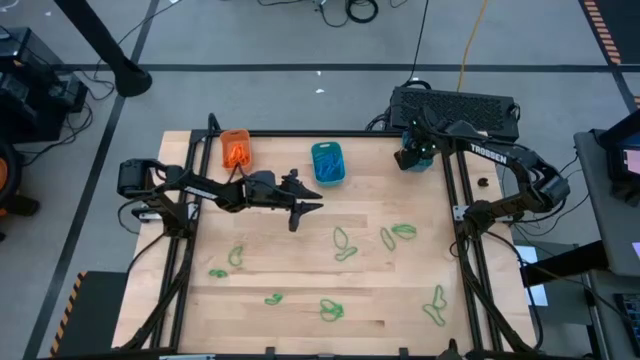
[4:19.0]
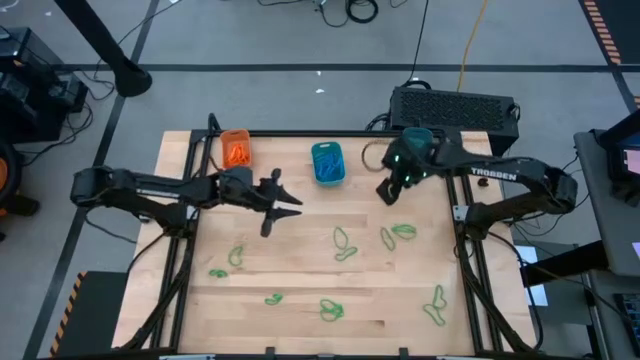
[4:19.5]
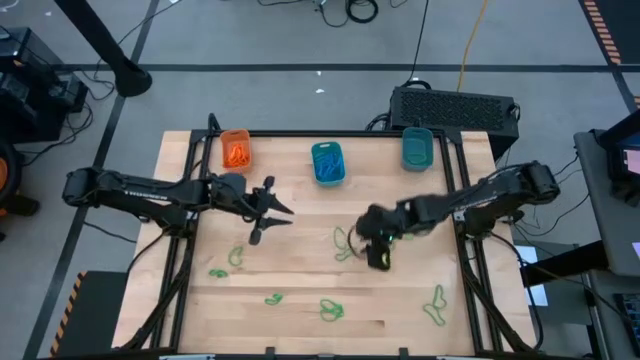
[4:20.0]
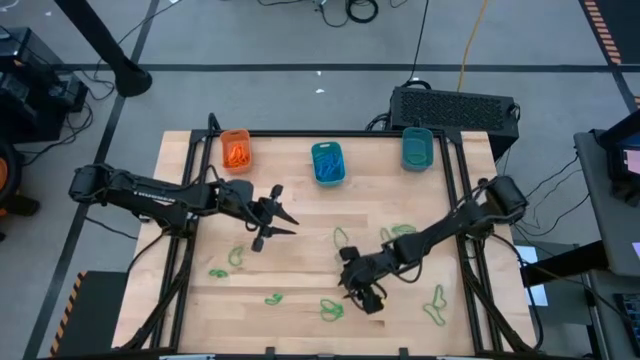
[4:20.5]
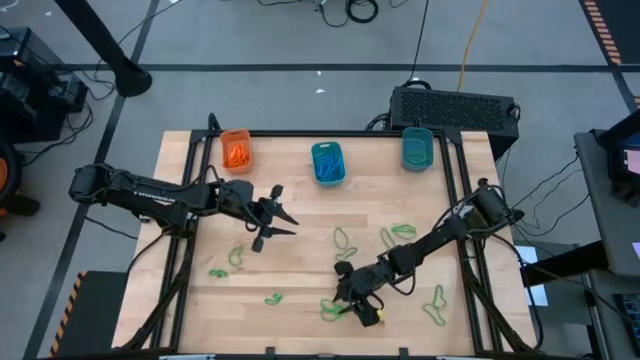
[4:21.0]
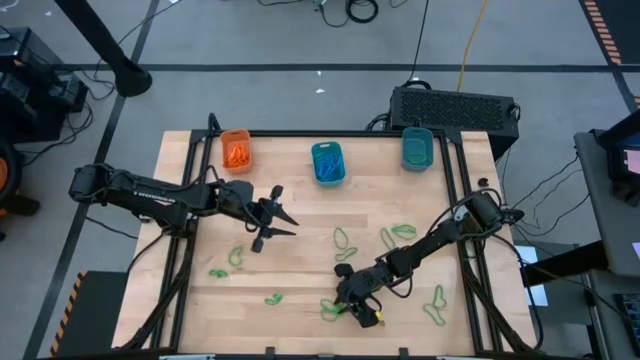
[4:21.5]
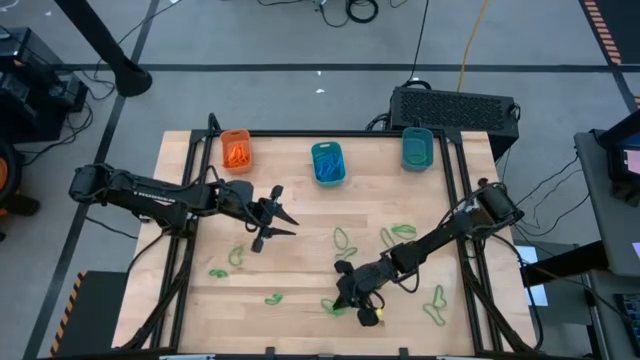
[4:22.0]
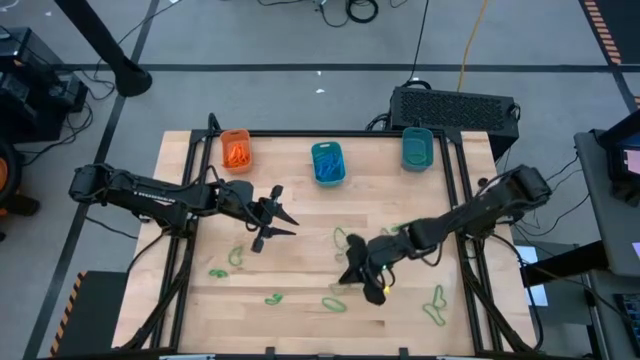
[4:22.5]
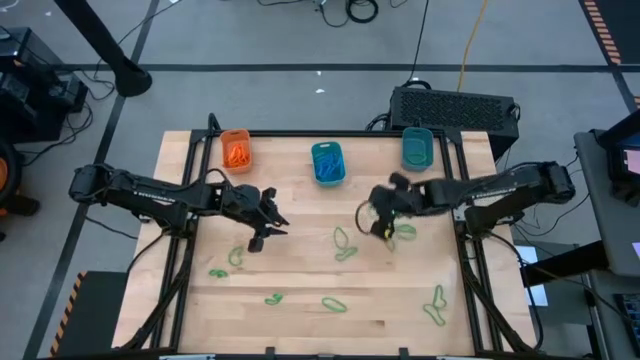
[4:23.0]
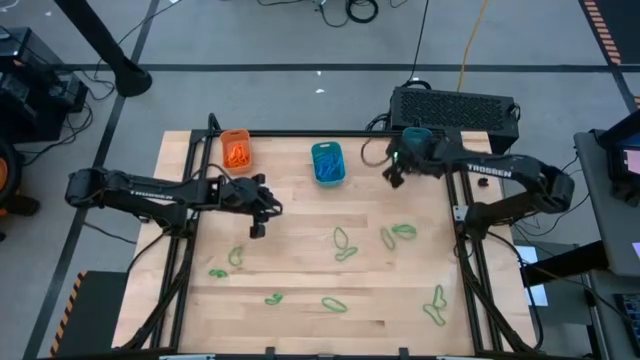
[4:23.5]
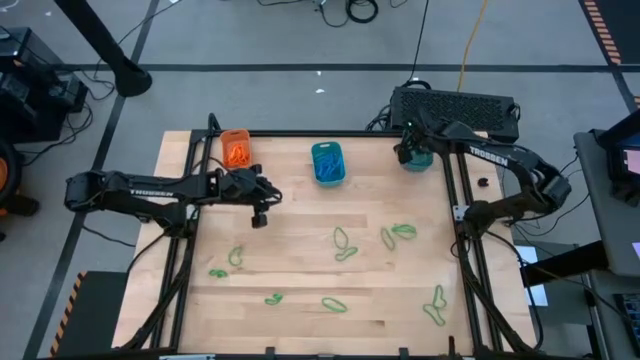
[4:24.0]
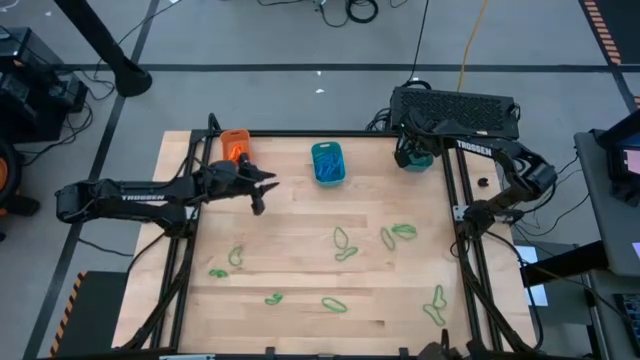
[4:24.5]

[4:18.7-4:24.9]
Task: Sort rubber bands into baskets
Put the green rubber band into the dark blue bin

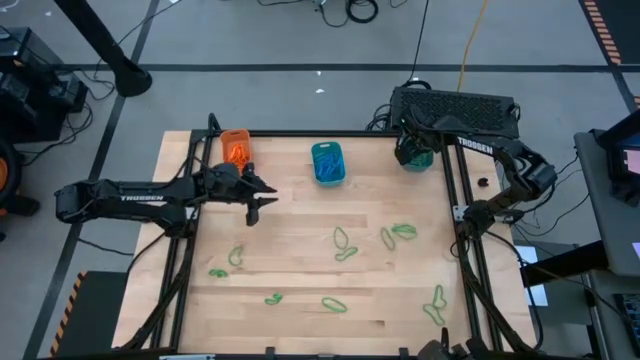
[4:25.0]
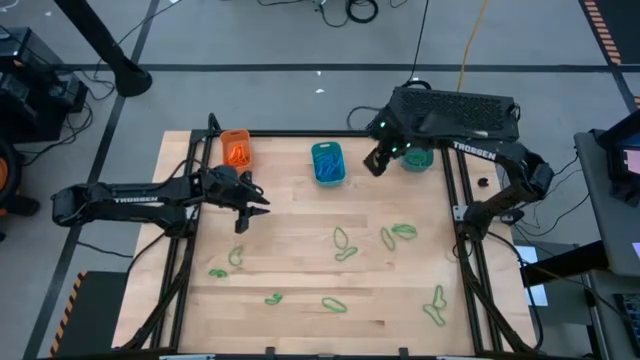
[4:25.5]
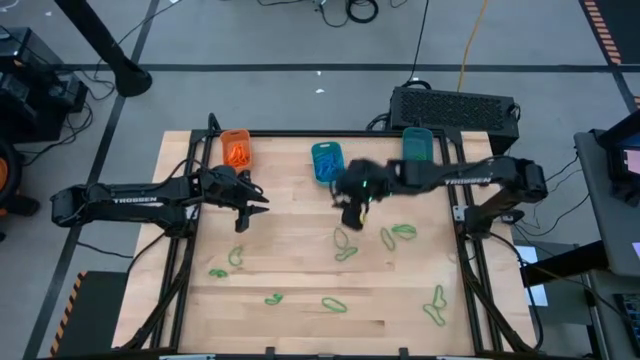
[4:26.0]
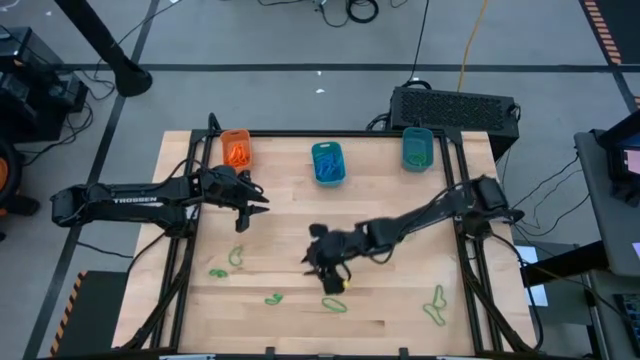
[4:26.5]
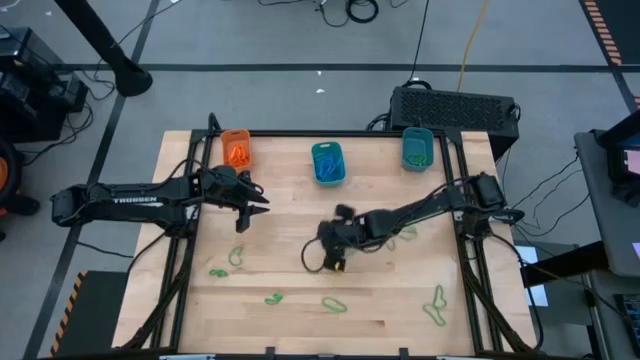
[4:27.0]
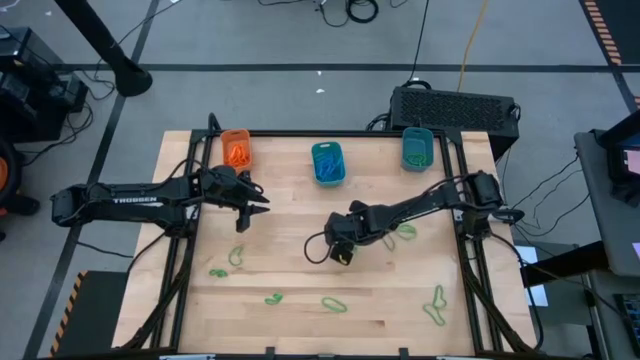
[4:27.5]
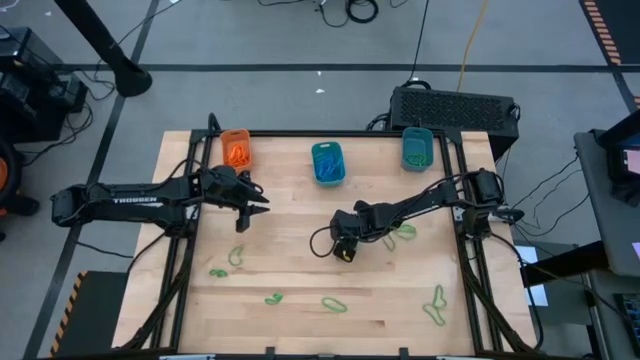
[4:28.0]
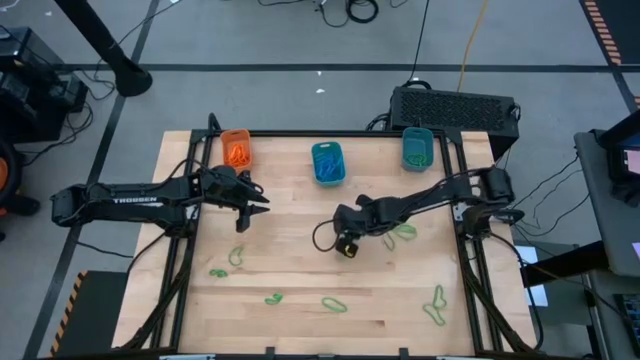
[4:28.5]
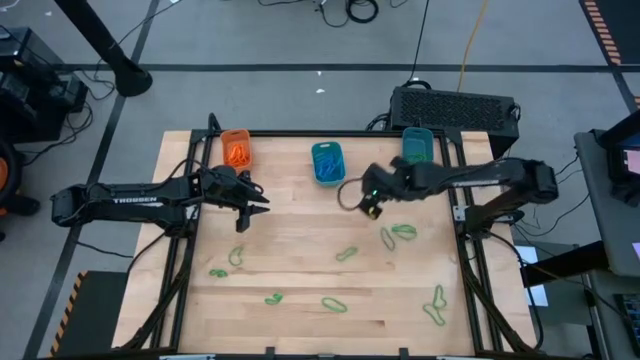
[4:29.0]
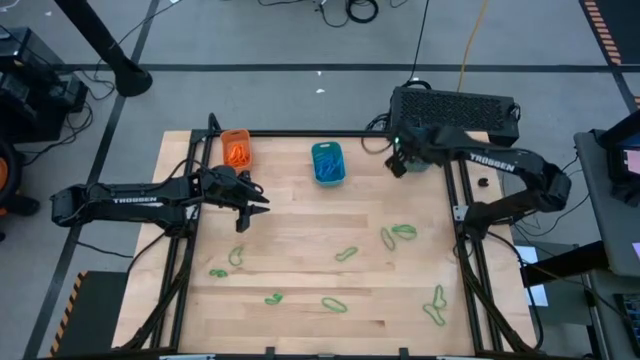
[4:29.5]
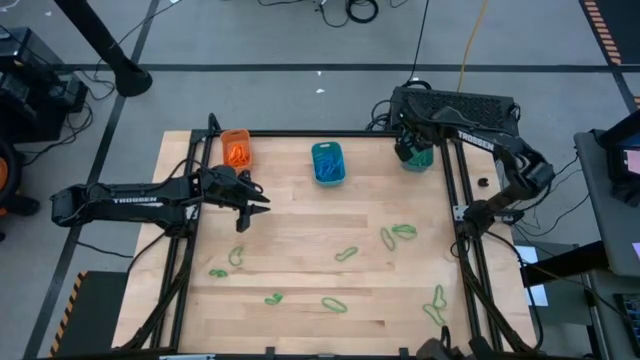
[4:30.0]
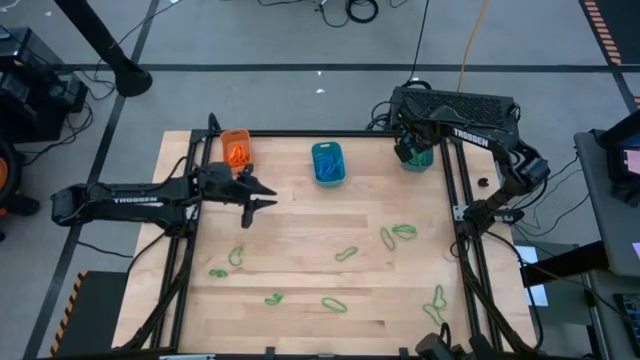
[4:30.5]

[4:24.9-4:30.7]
Put the green rubber band into the dark blue bin

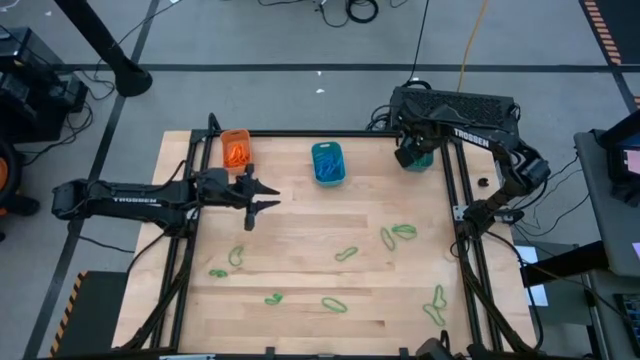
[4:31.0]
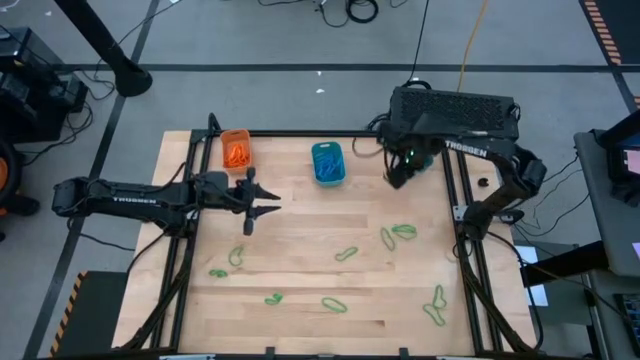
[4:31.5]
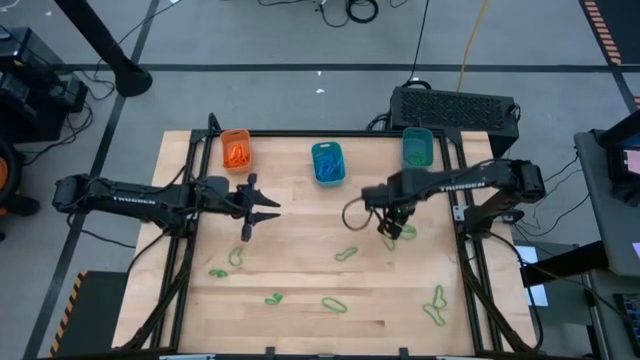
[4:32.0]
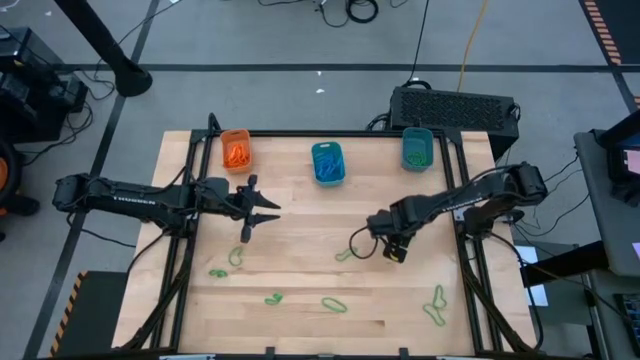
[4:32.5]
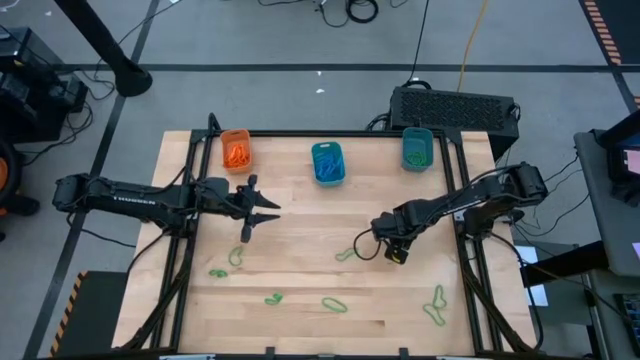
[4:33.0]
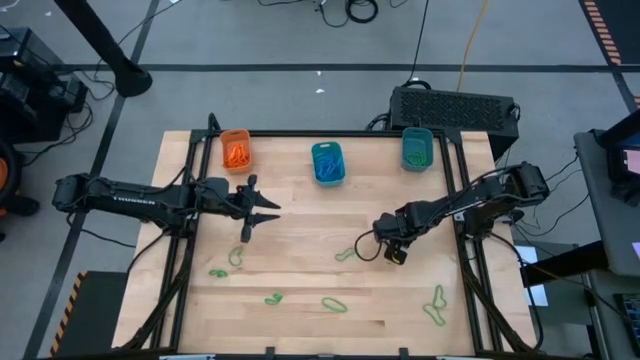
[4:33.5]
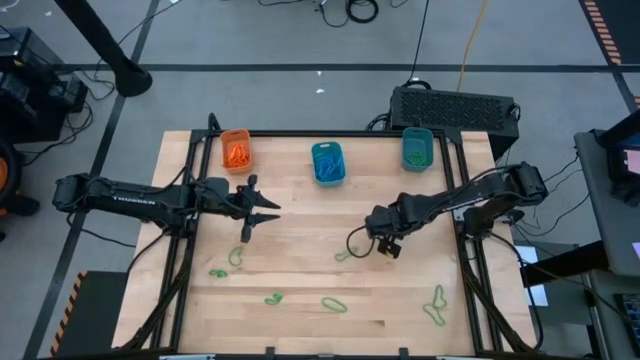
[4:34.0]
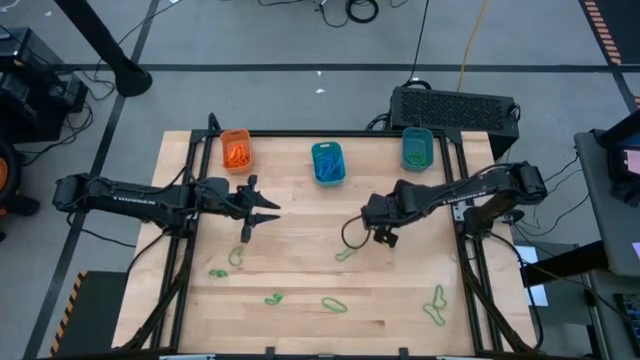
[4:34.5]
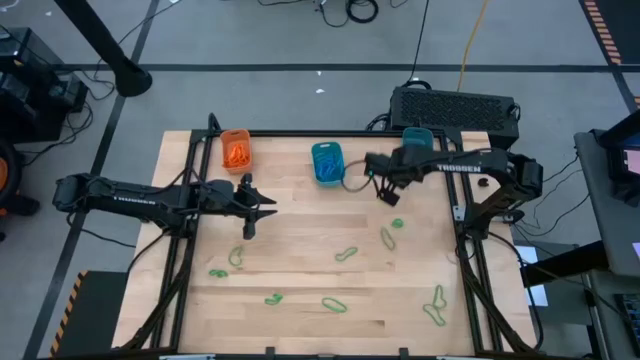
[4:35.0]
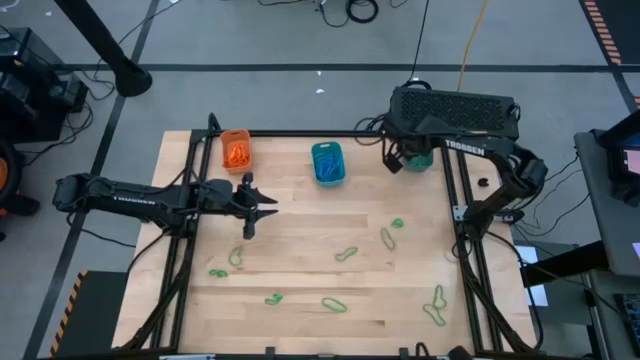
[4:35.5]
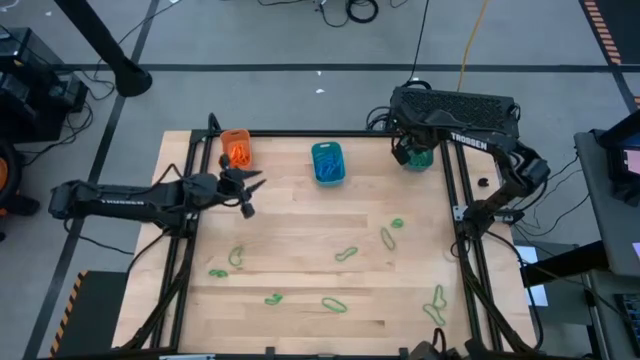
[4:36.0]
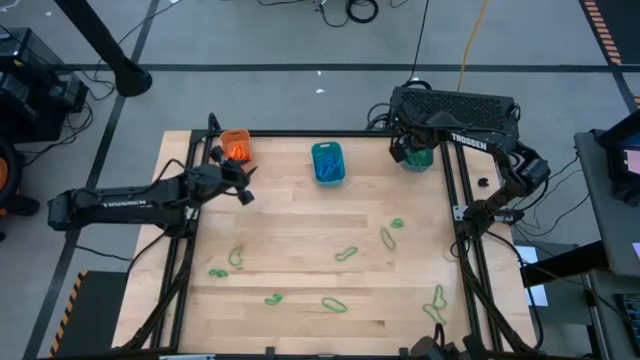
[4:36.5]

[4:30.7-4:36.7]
Put the green rubber band into the dark blue bin

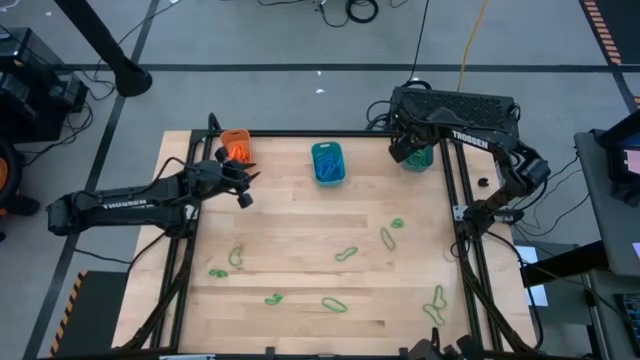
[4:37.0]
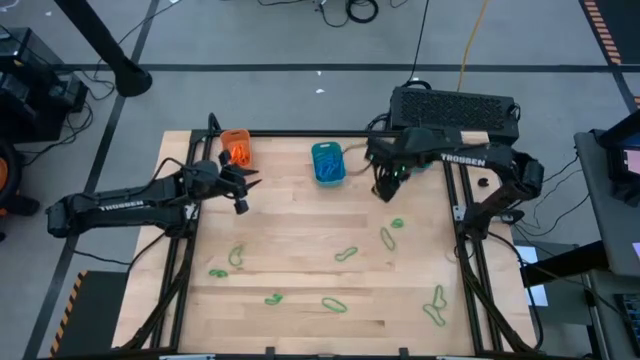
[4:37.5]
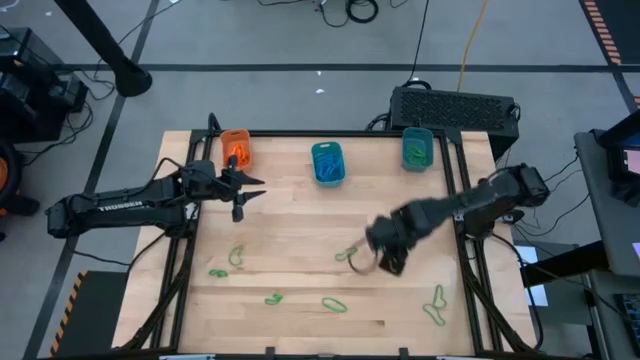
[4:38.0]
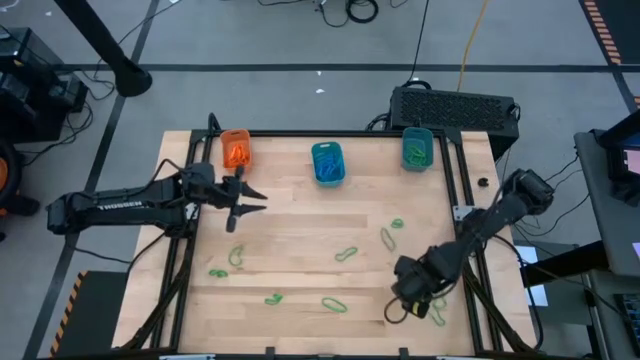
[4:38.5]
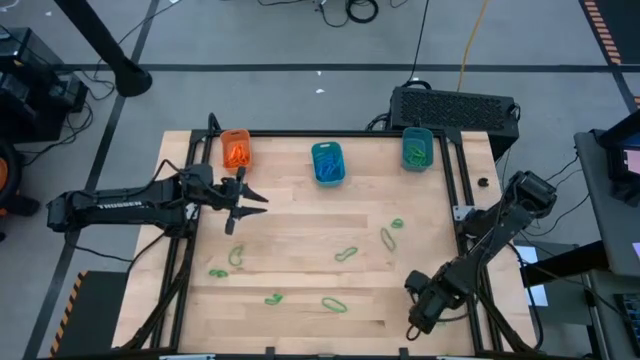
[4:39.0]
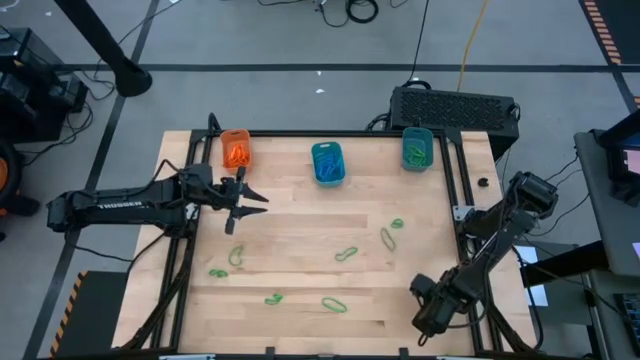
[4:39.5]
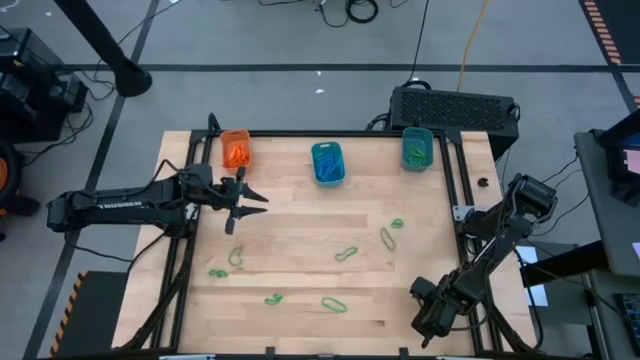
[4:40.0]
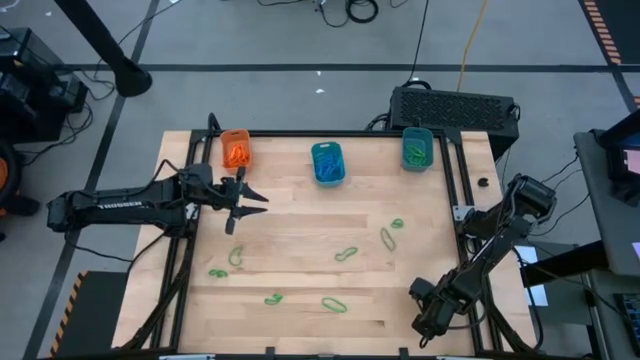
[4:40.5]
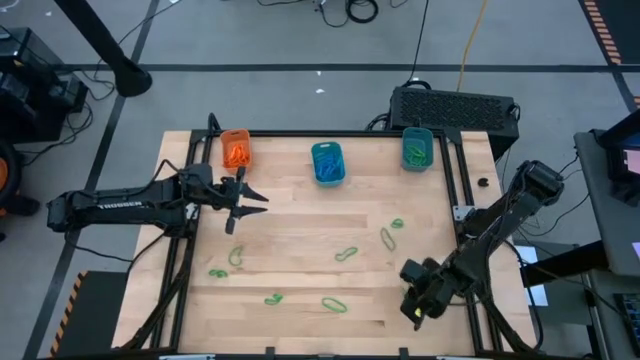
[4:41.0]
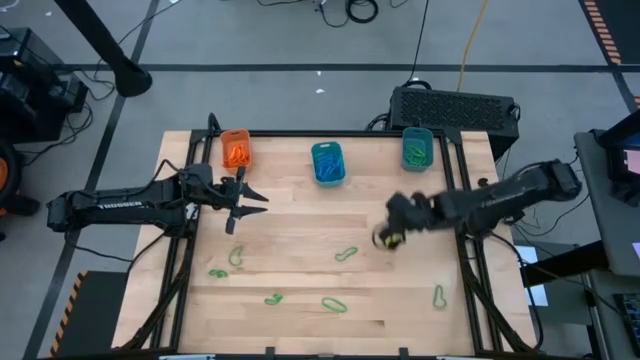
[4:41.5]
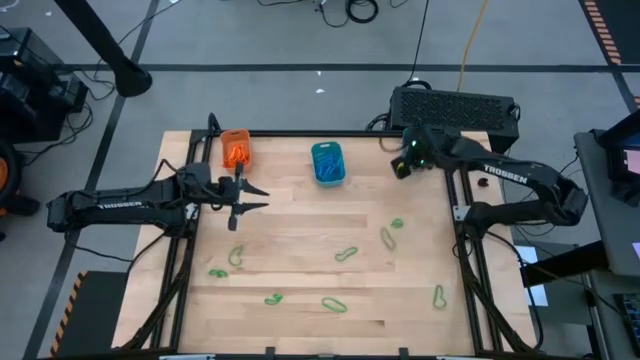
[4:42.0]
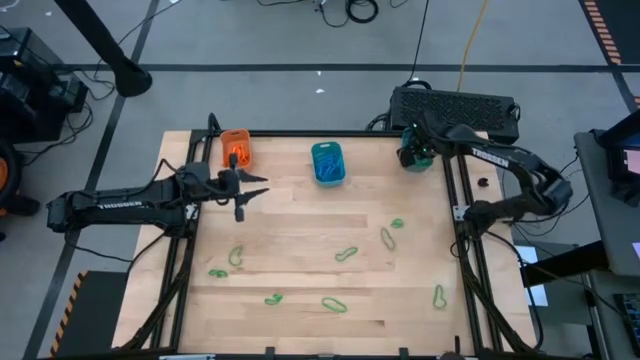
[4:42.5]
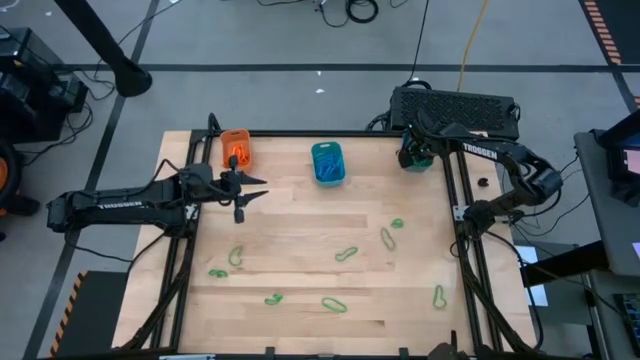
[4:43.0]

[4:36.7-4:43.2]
Put the green rubber band into the dark blue bin
